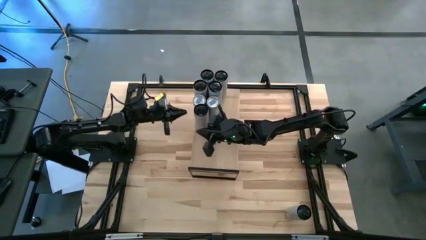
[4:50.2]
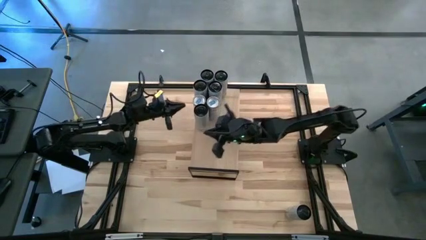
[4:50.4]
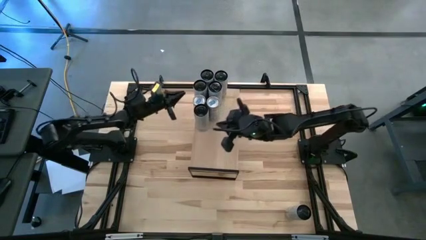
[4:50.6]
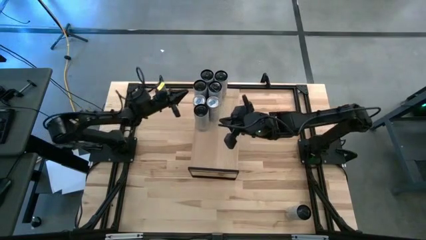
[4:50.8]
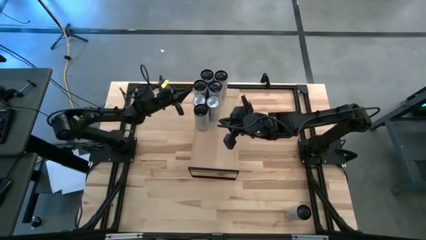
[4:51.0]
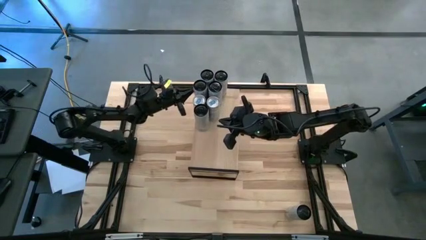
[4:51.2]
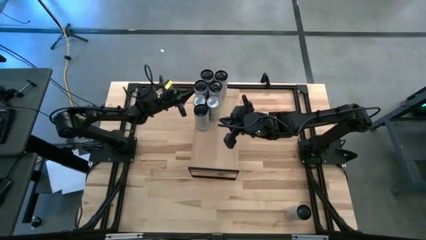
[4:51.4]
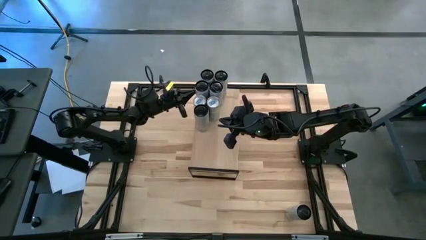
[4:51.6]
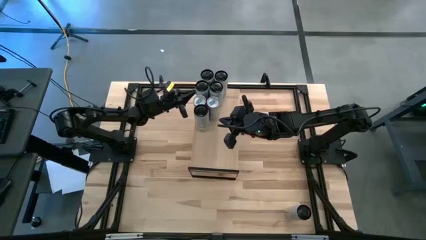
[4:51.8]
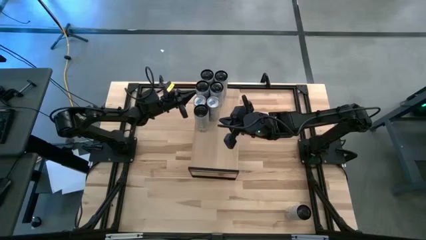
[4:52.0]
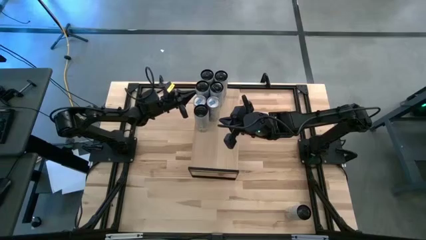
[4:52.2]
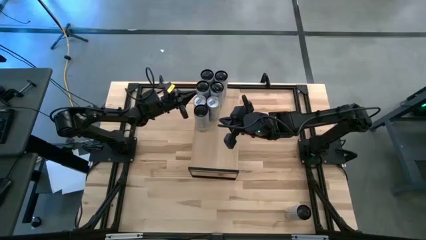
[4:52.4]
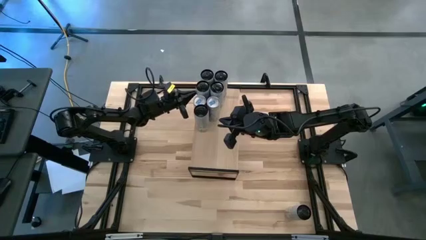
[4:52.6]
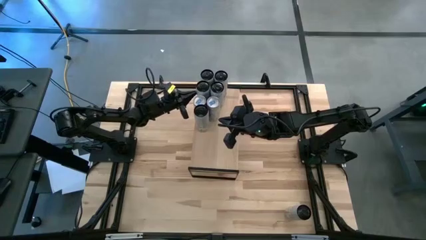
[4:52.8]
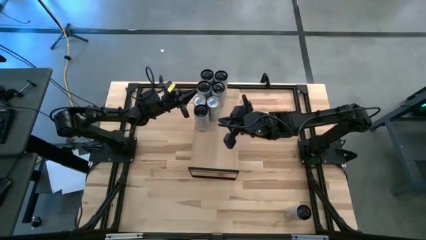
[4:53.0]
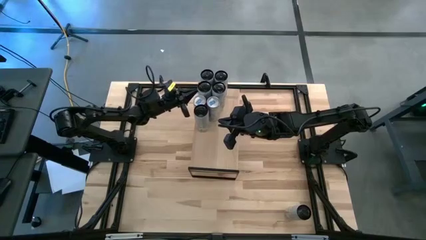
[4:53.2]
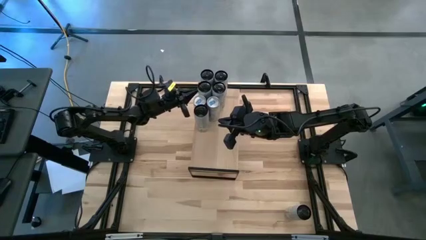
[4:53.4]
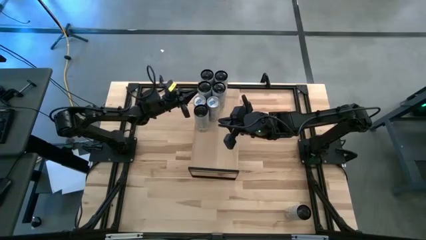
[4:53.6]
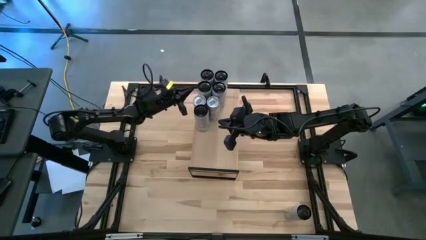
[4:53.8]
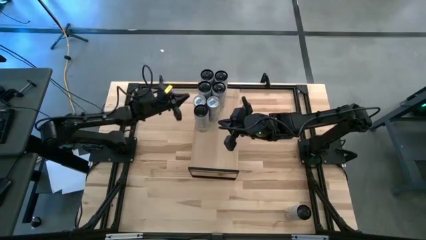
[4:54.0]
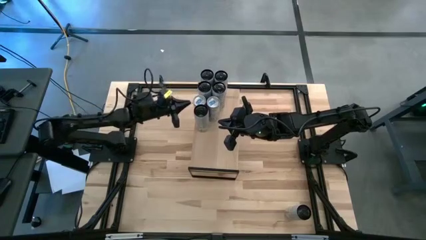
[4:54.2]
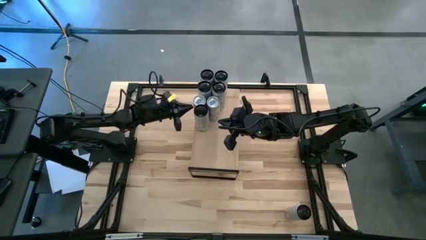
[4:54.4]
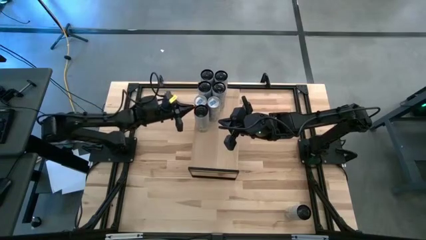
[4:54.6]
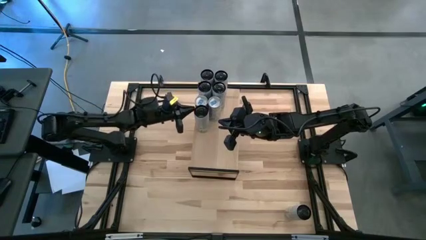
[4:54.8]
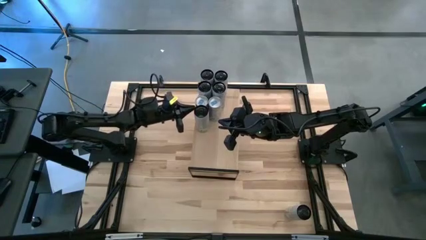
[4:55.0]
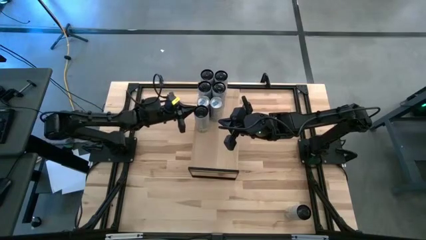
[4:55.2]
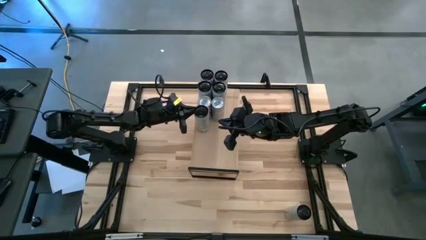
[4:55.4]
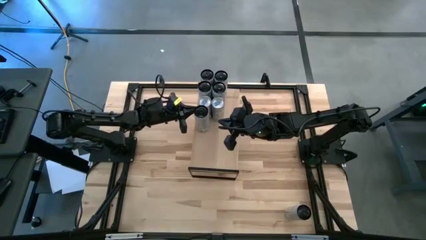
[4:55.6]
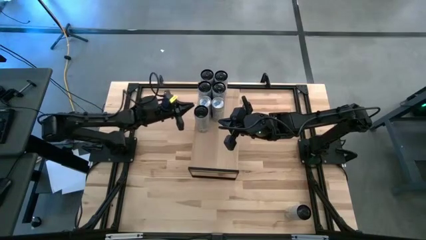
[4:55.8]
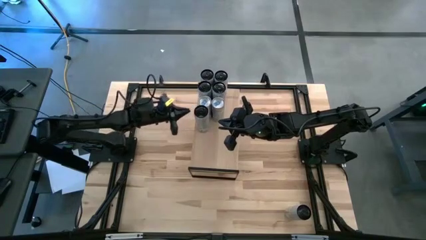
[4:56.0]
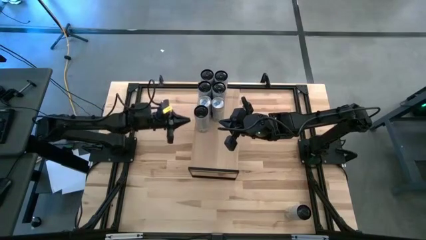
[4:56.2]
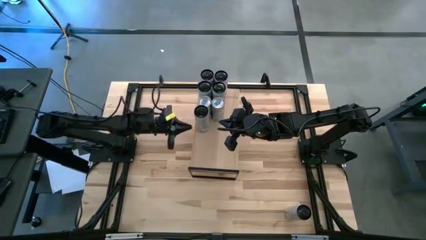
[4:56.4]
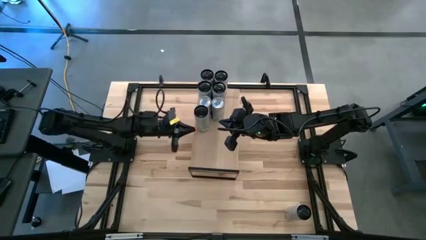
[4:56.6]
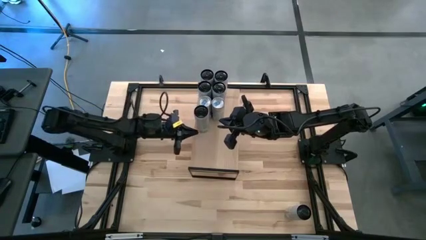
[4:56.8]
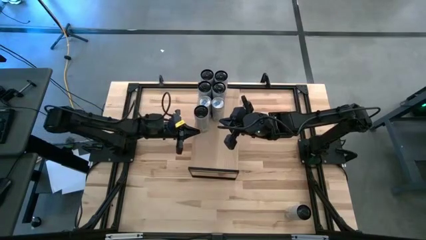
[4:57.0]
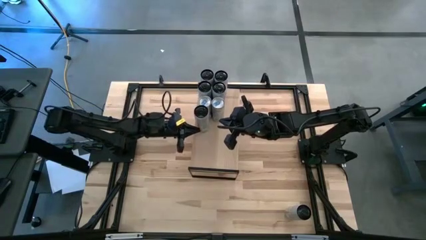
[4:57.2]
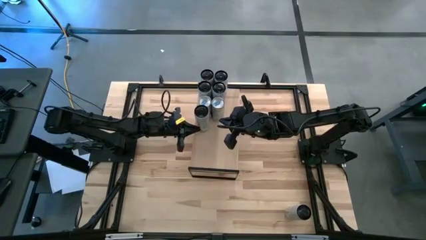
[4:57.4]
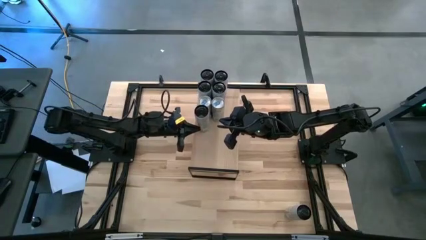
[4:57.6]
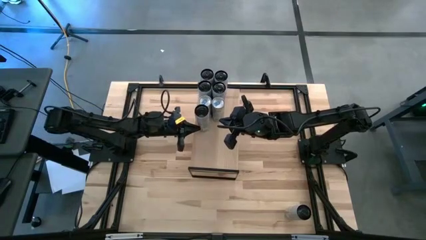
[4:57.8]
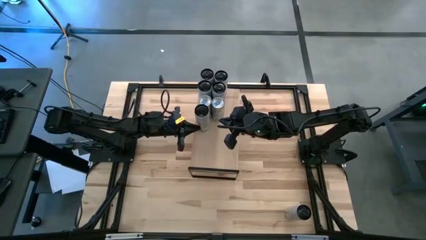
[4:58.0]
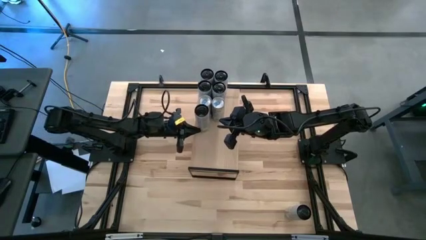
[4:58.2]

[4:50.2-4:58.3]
Task: Place canned beverage on shelf
Adjust the soda cans on the shelf

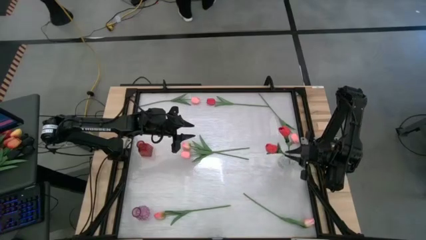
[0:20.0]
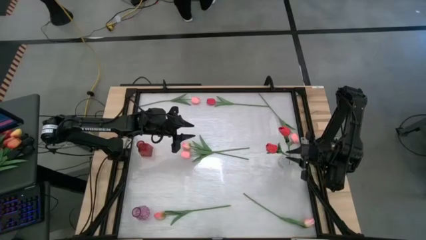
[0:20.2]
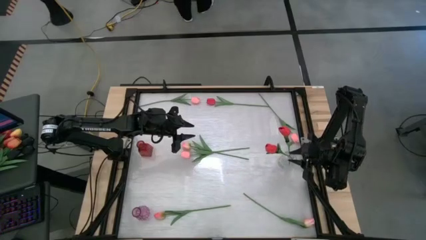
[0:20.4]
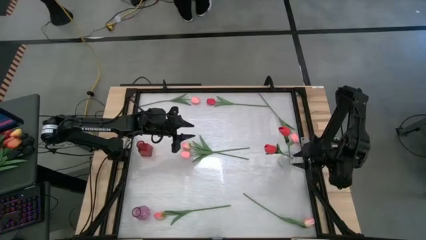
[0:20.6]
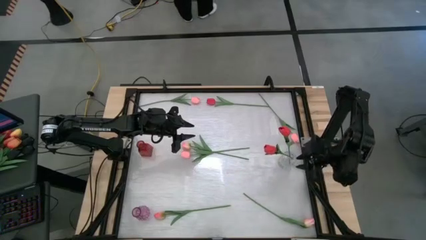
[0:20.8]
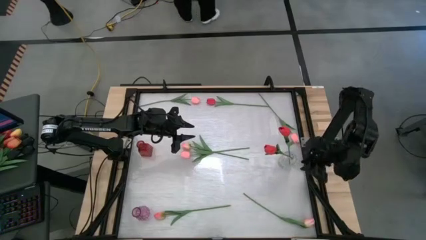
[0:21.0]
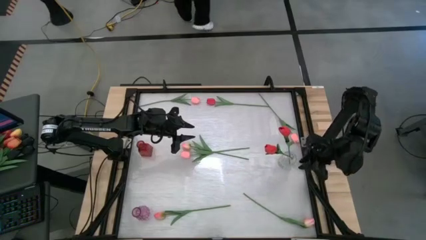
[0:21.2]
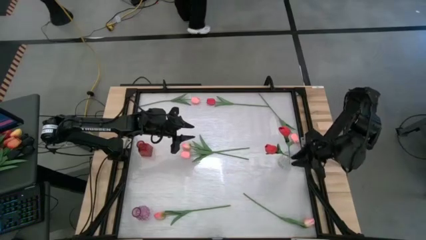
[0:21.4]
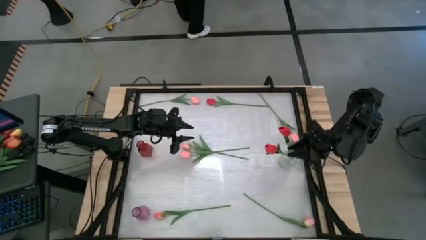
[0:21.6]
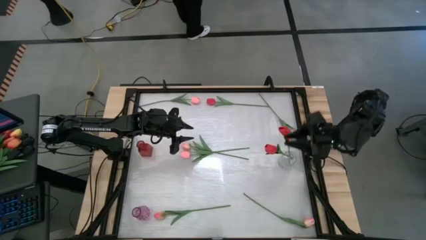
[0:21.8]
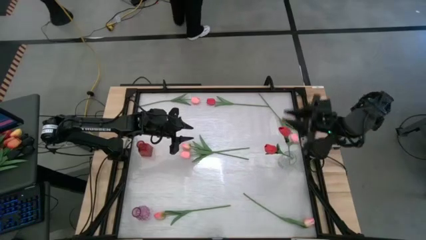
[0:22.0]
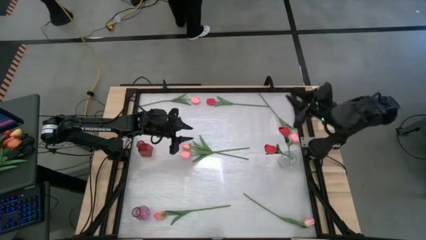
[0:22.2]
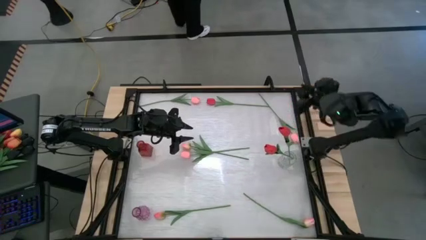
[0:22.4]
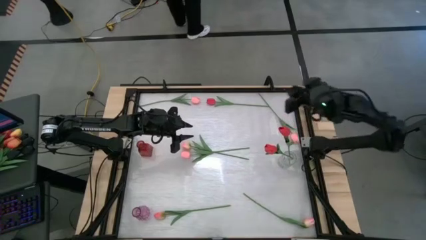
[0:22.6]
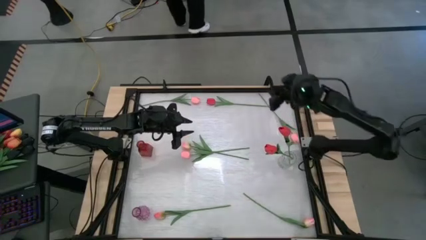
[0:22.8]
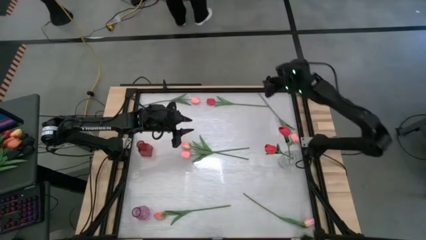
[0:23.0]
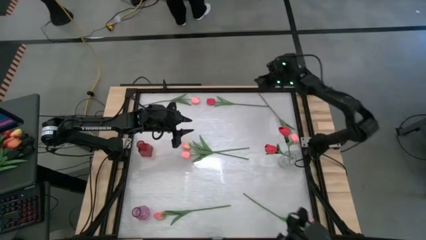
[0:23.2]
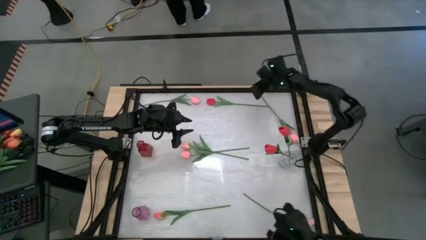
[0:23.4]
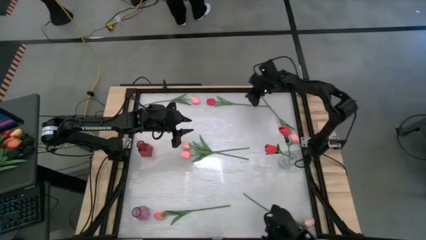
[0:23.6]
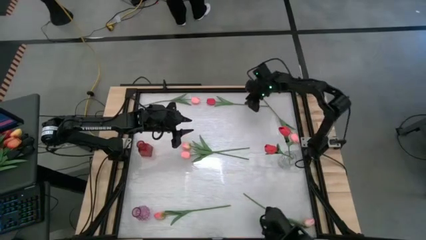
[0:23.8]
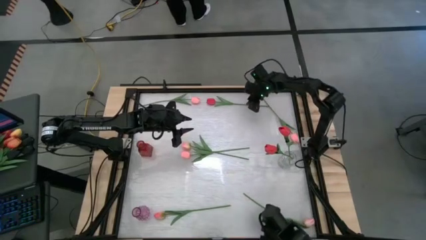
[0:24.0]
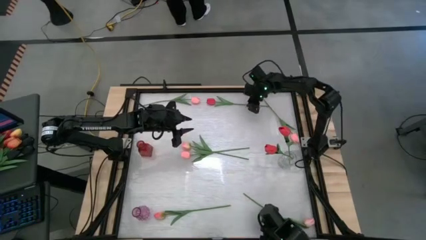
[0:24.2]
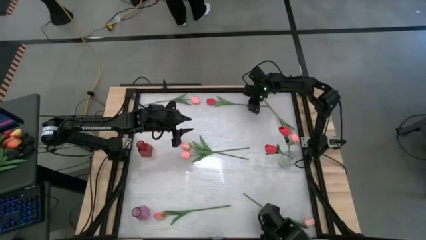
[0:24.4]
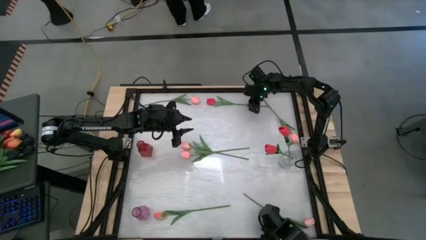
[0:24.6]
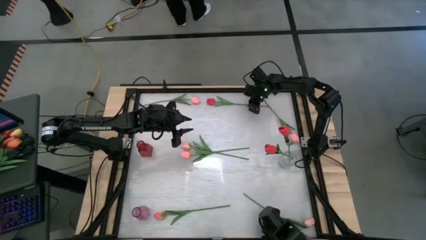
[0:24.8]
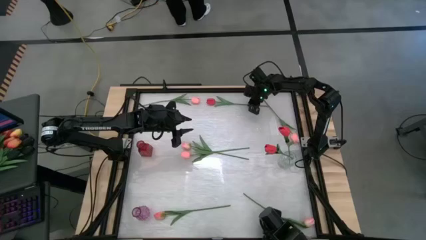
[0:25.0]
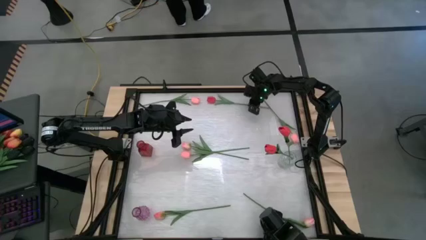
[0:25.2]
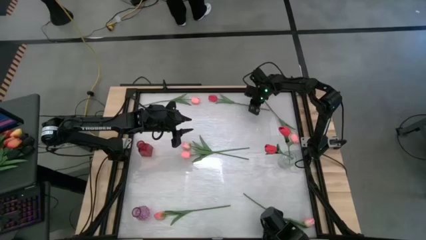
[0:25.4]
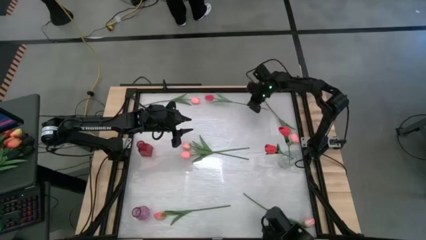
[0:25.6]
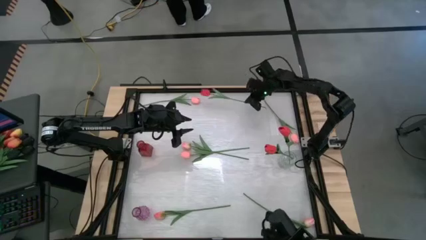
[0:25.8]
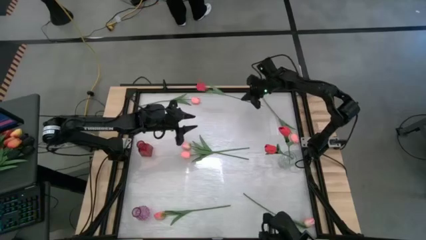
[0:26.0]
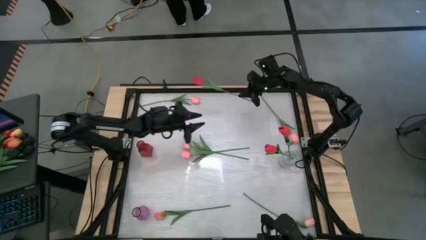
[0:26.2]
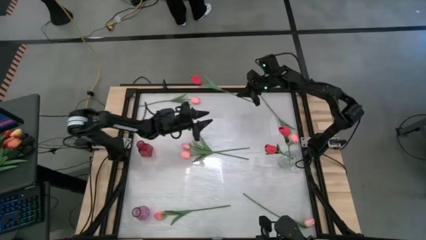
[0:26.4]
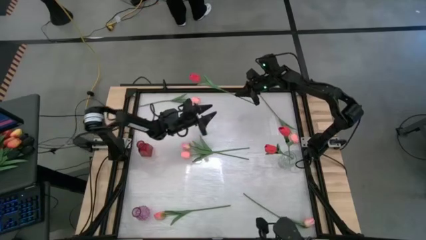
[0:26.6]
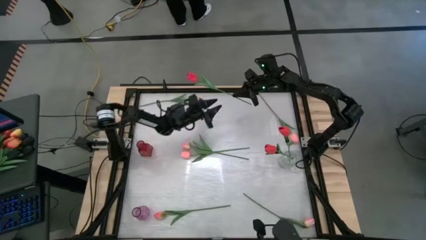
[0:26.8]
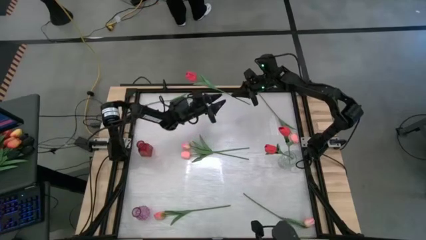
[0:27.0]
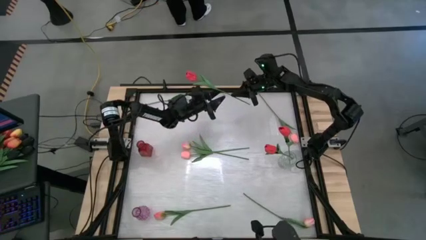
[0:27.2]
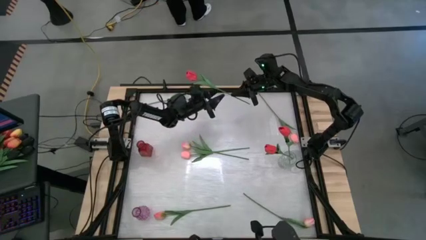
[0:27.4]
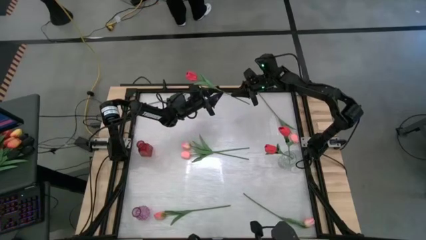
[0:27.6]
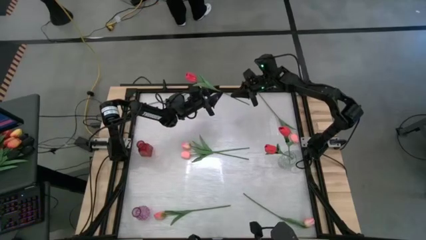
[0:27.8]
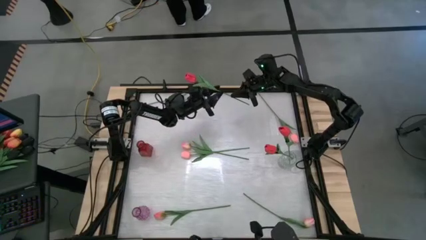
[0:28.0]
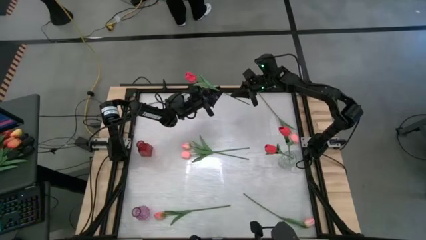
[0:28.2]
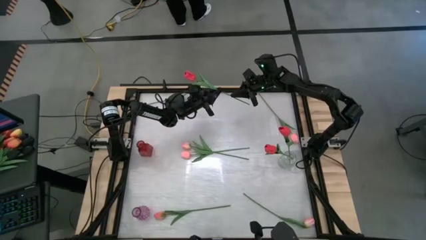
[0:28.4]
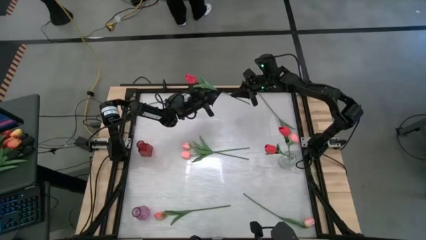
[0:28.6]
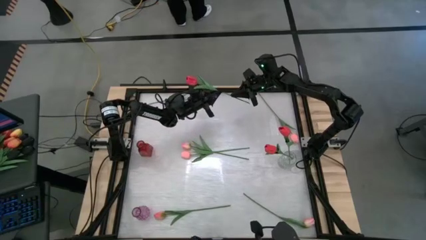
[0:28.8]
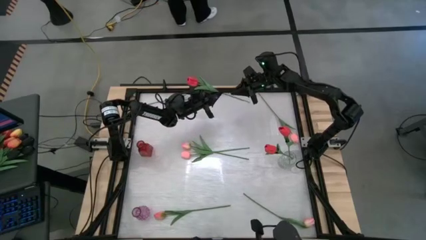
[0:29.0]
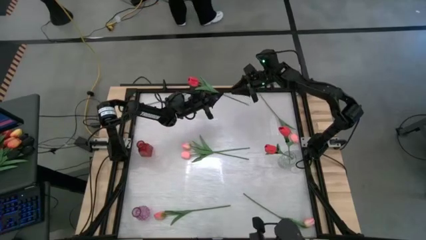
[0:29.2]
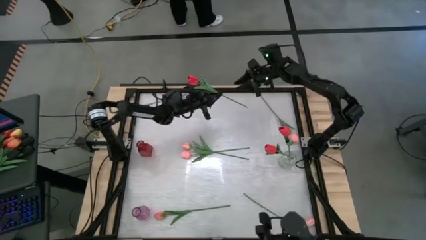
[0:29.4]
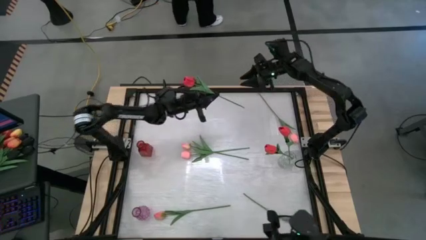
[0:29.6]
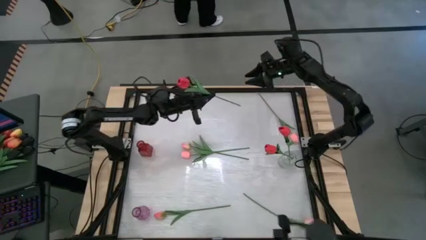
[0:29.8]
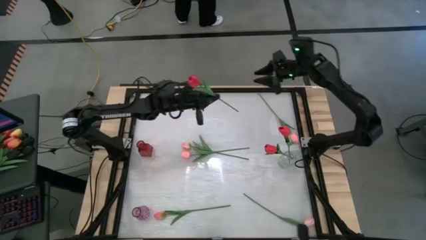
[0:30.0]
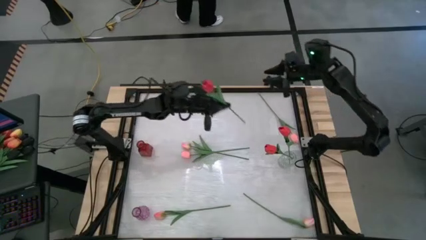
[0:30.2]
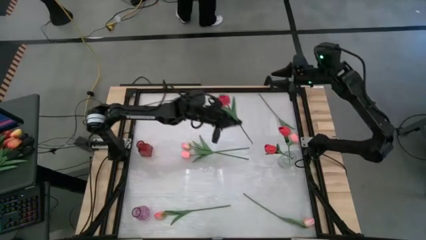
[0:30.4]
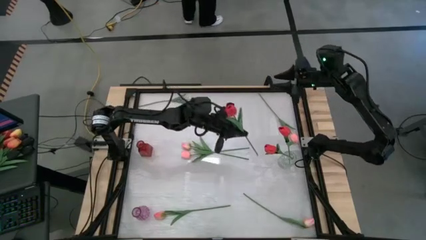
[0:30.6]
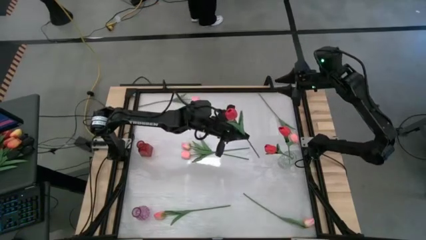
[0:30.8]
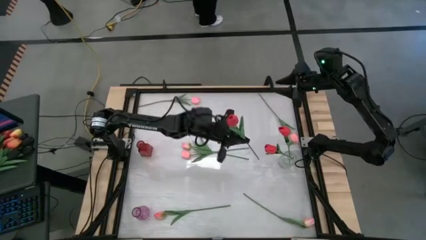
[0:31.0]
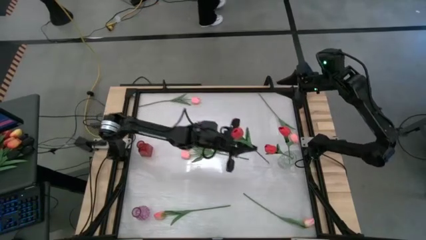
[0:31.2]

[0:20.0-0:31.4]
Task: Sort flowers into vase by color
Put the red flower into the transparent flower vase
